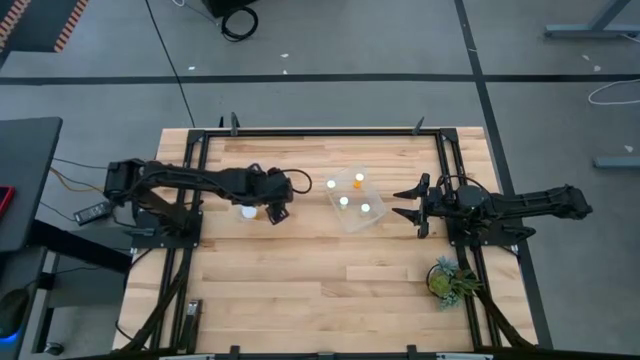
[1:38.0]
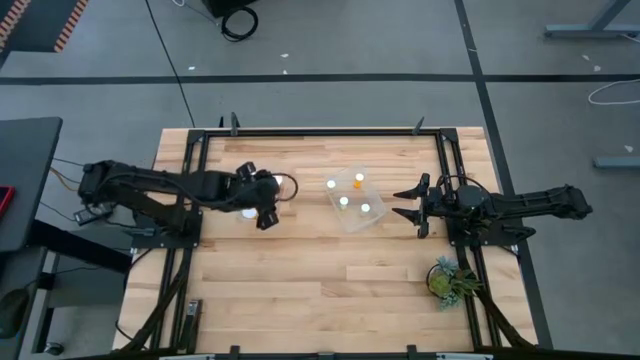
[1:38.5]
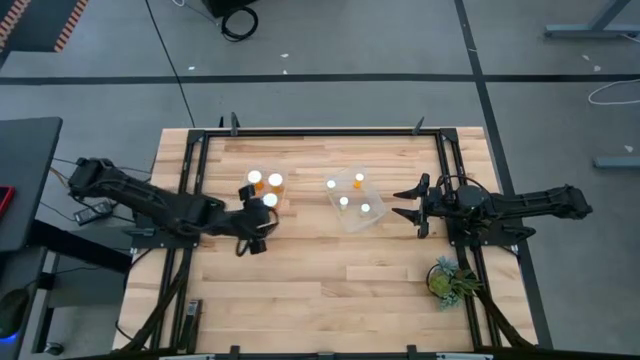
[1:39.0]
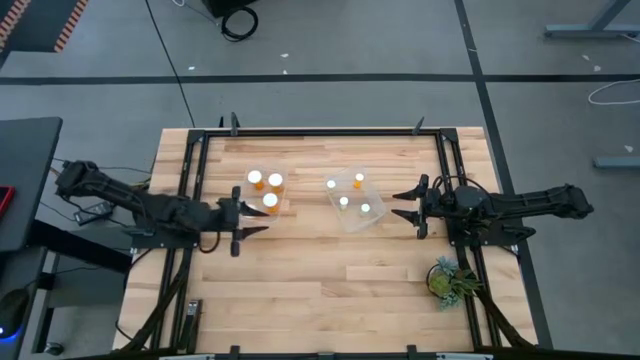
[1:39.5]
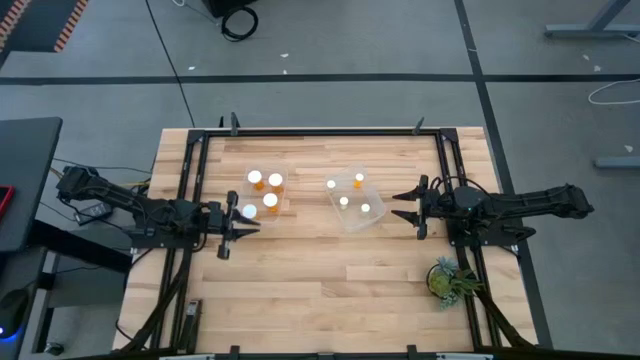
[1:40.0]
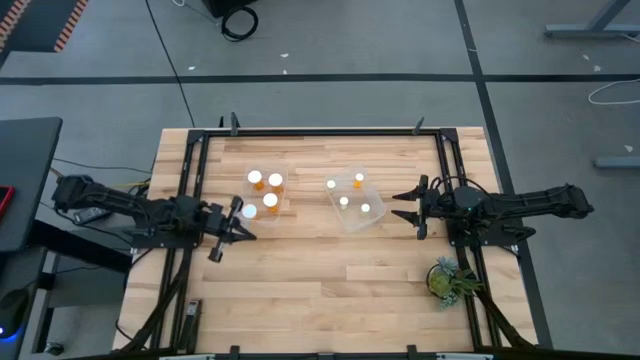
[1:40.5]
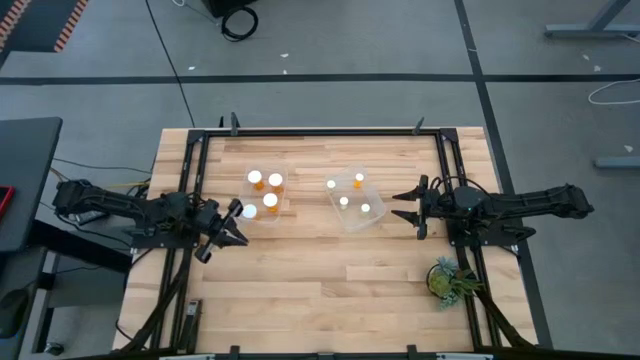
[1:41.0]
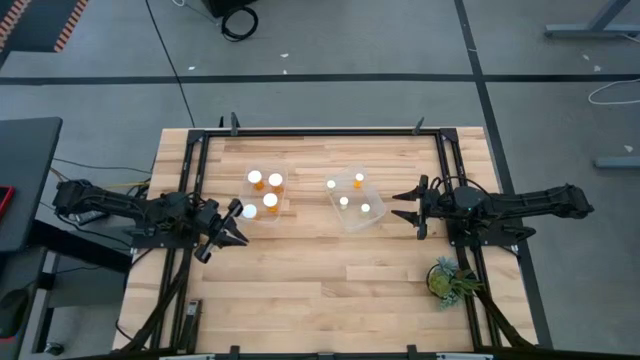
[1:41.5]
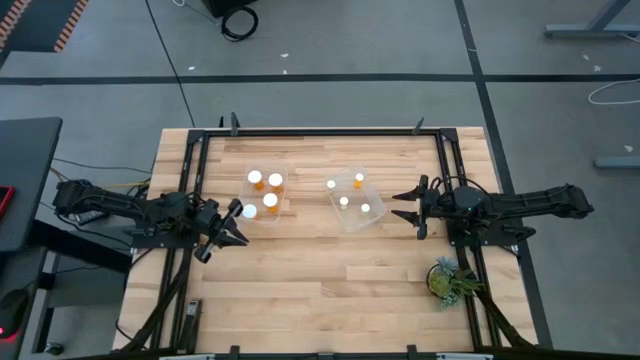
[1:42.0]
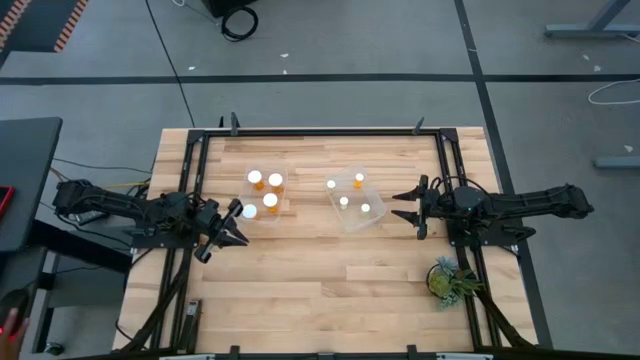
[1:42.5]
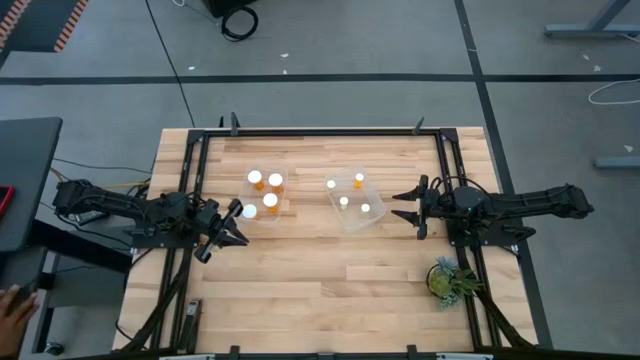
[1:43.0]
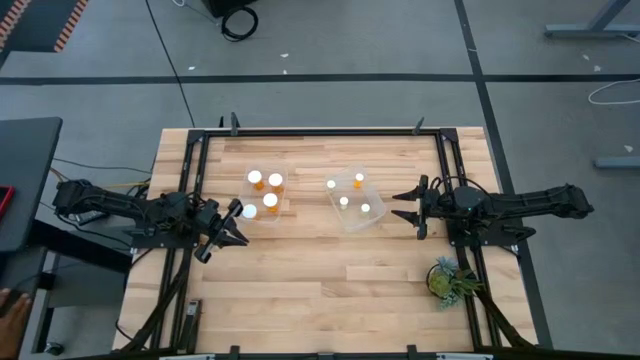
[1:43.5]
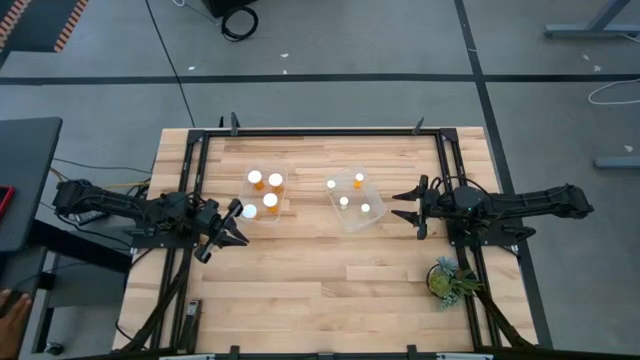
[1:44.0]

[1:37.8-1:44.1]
Task: Pick and place medicine bottles into bin by pill shape (circle, oval)
Return to Home Position

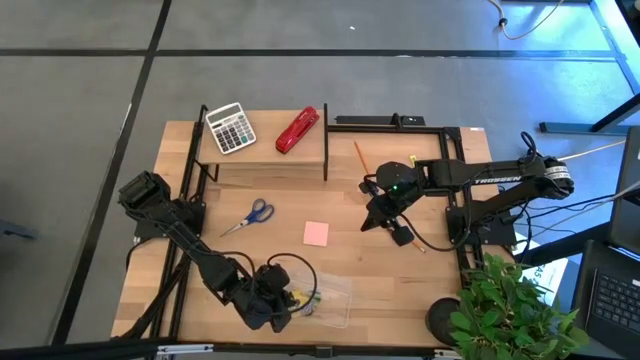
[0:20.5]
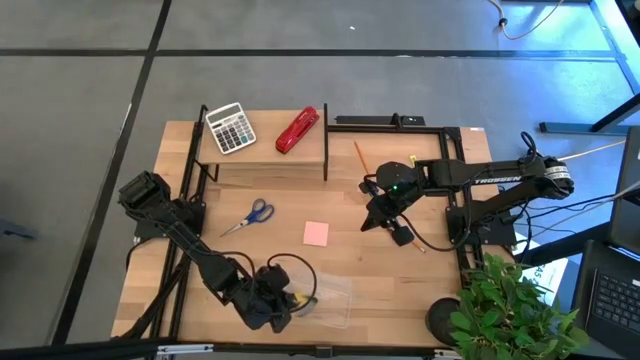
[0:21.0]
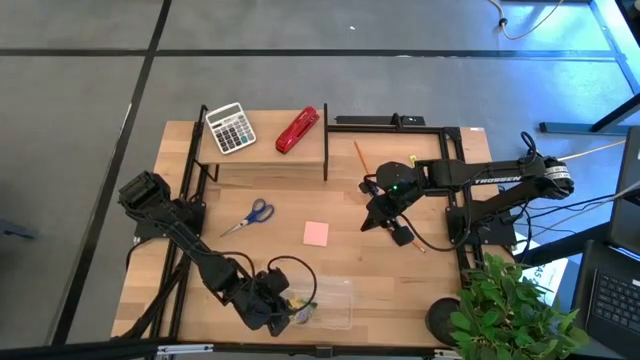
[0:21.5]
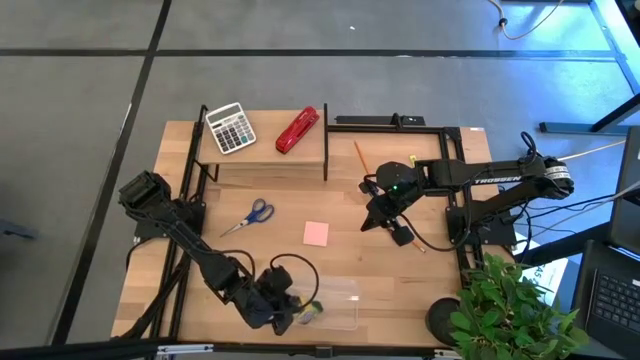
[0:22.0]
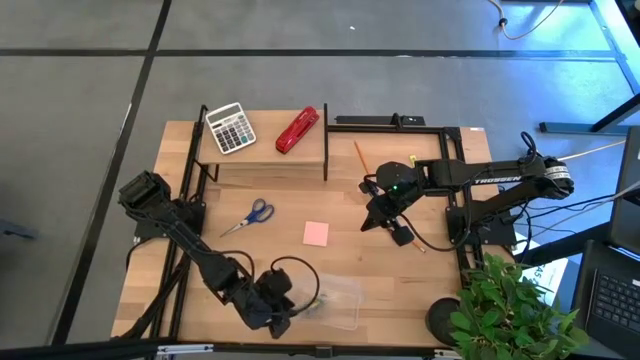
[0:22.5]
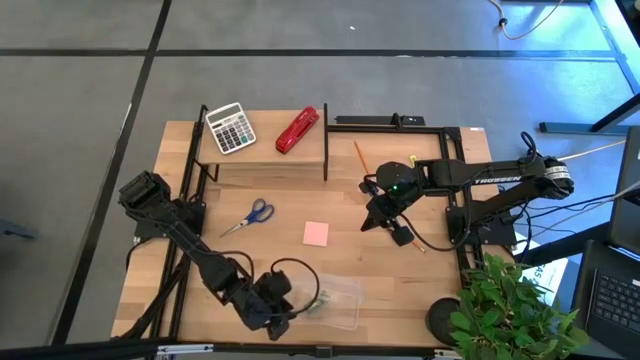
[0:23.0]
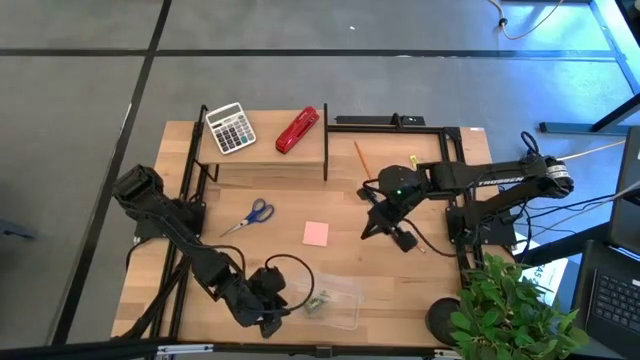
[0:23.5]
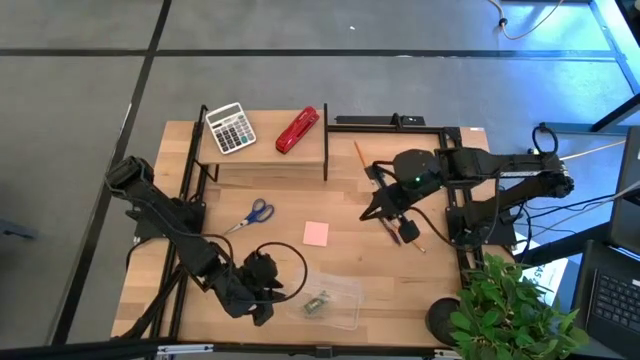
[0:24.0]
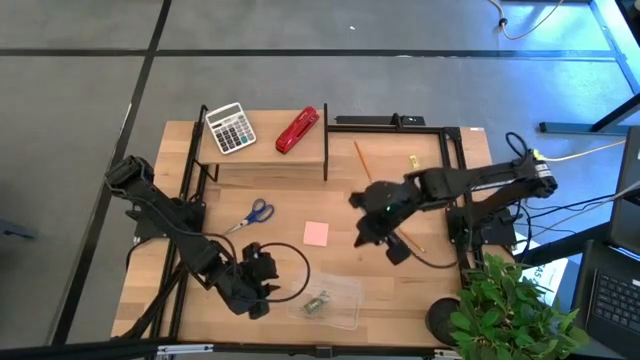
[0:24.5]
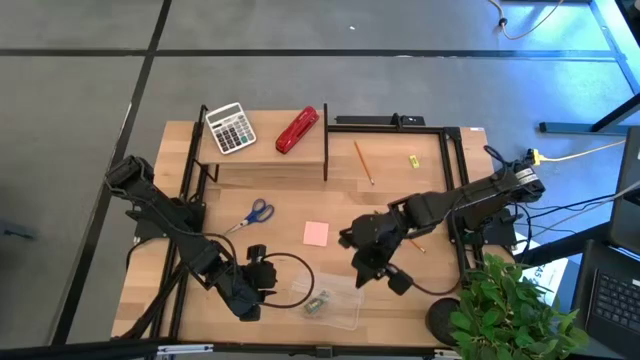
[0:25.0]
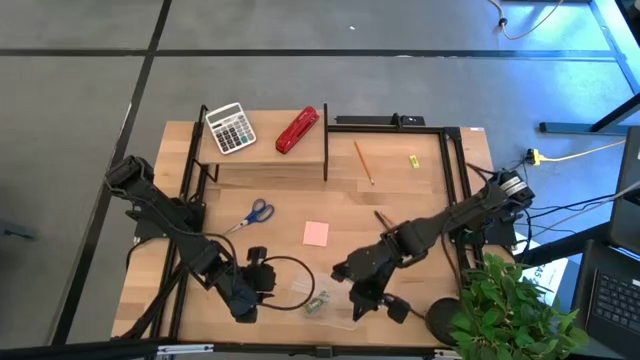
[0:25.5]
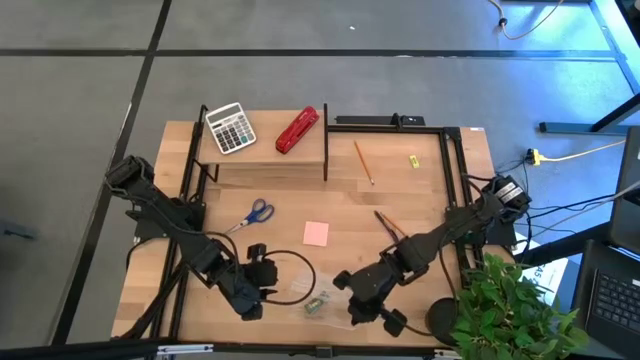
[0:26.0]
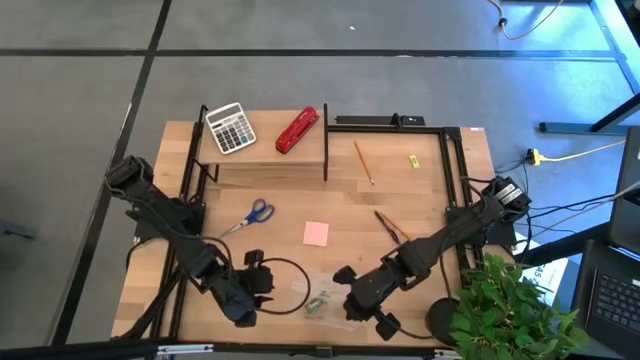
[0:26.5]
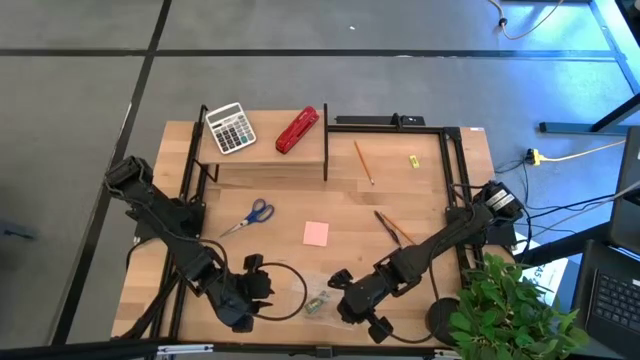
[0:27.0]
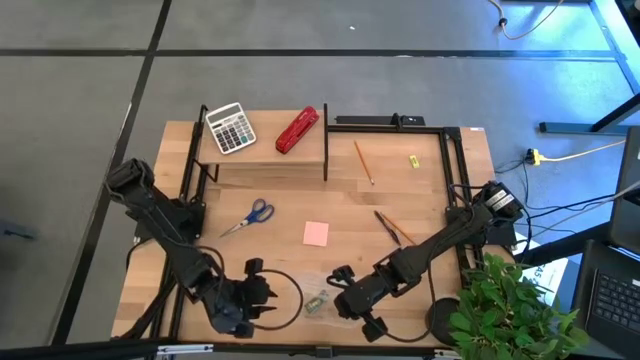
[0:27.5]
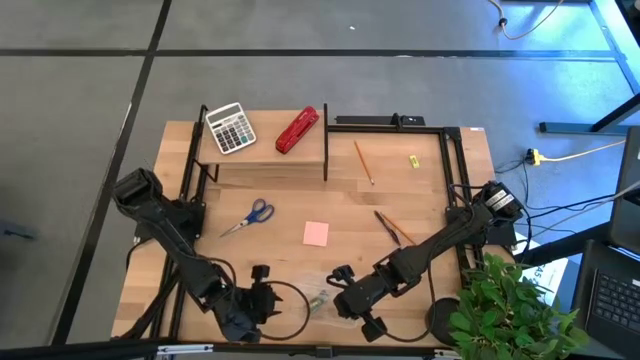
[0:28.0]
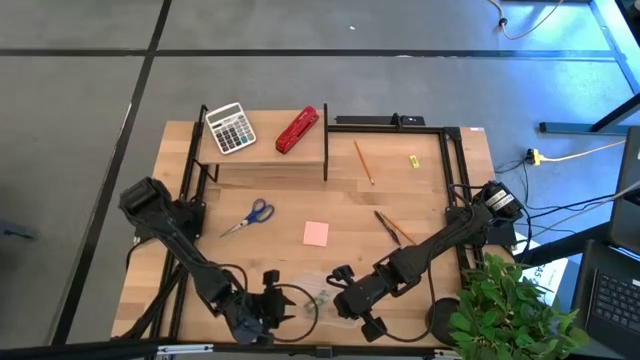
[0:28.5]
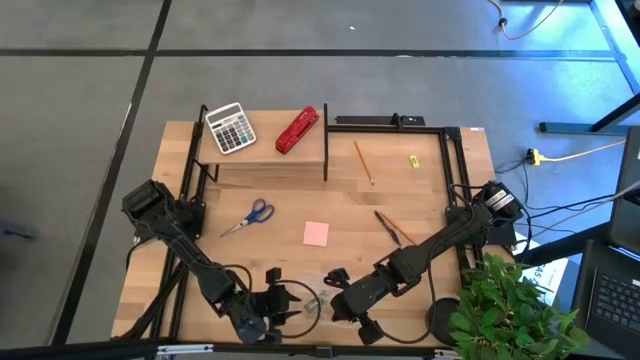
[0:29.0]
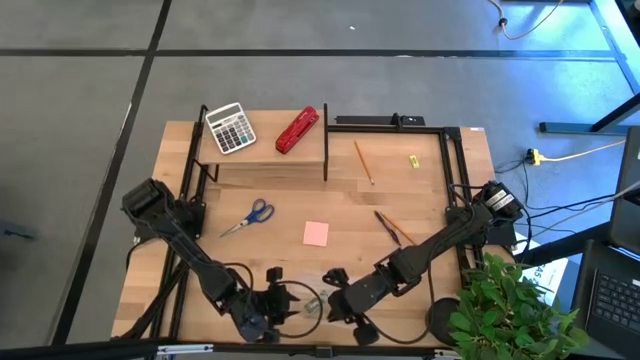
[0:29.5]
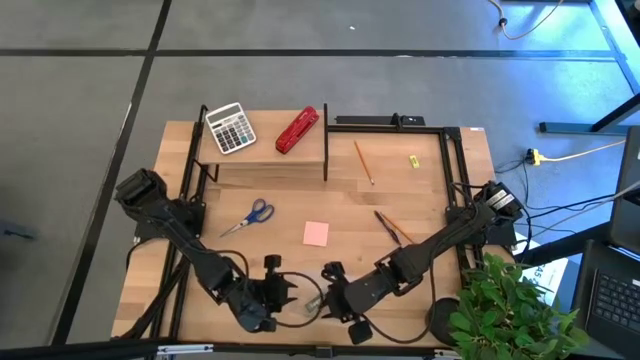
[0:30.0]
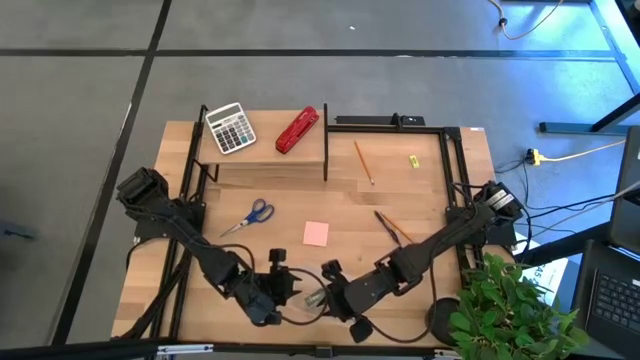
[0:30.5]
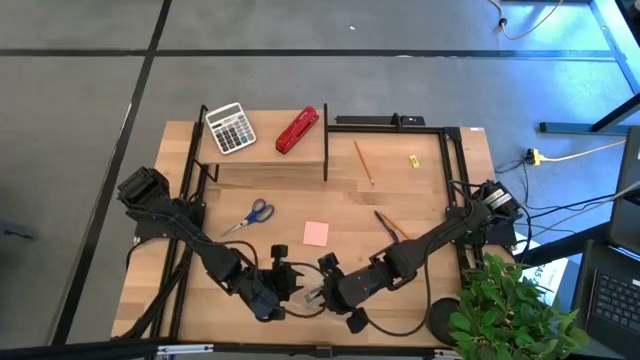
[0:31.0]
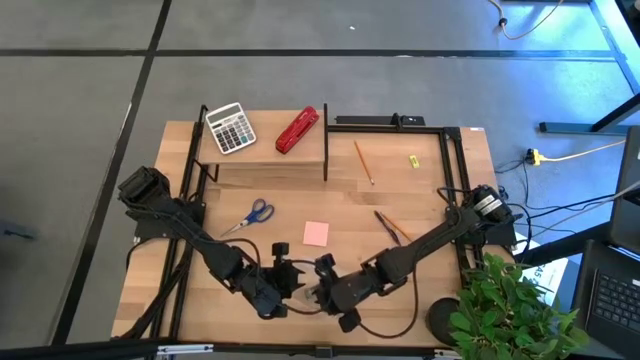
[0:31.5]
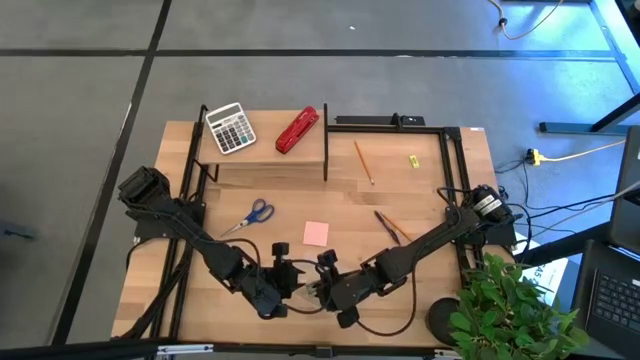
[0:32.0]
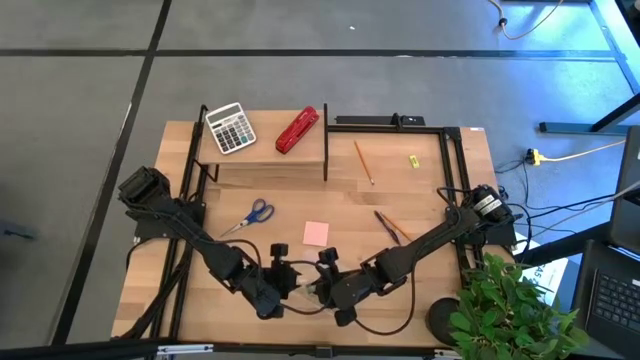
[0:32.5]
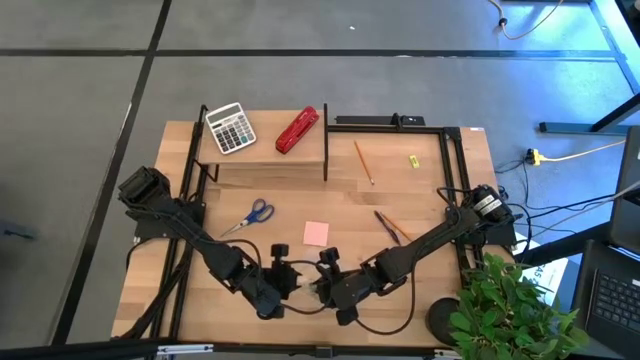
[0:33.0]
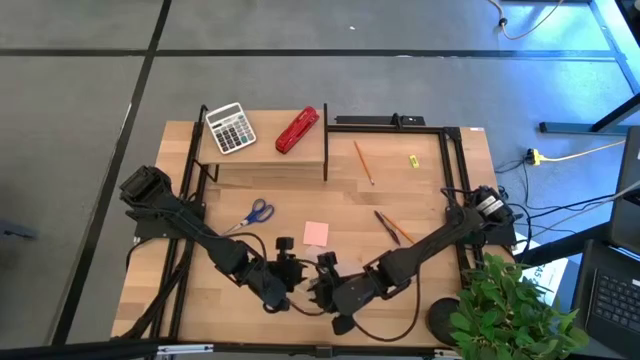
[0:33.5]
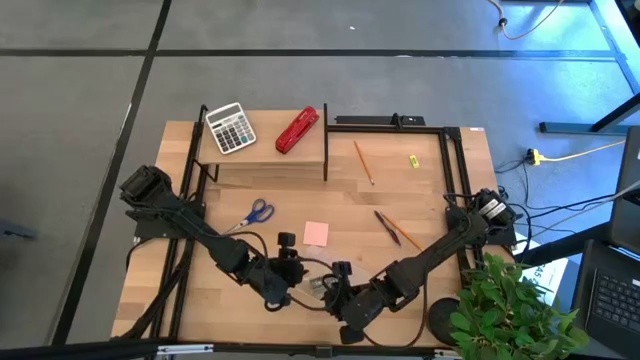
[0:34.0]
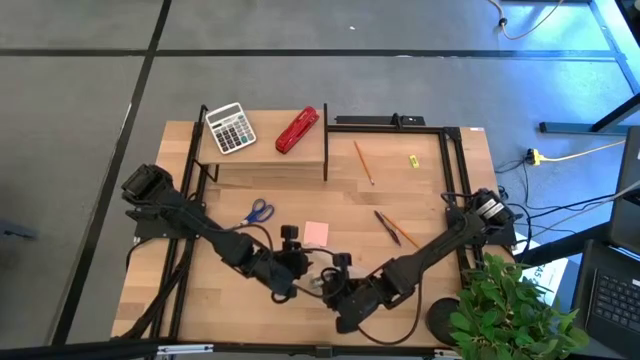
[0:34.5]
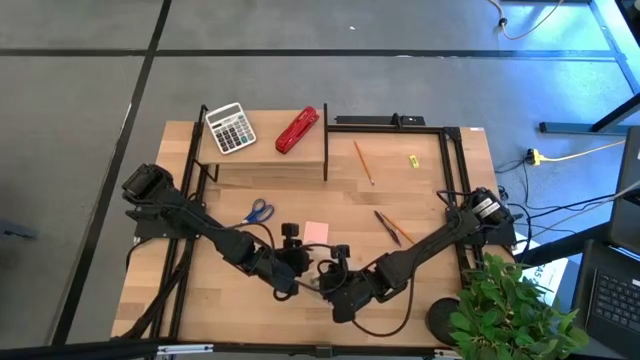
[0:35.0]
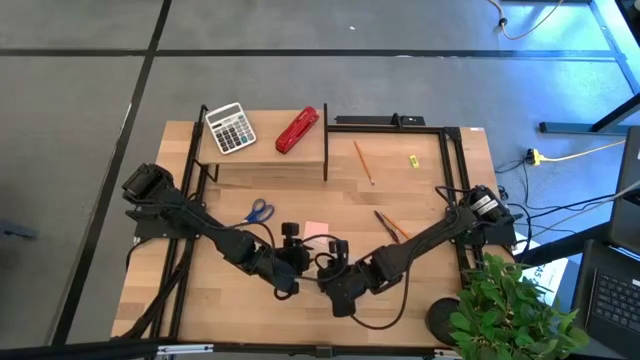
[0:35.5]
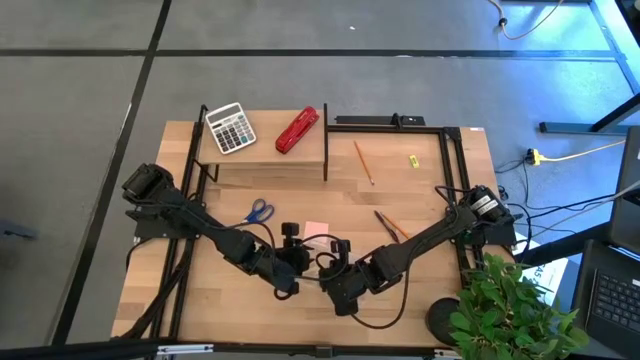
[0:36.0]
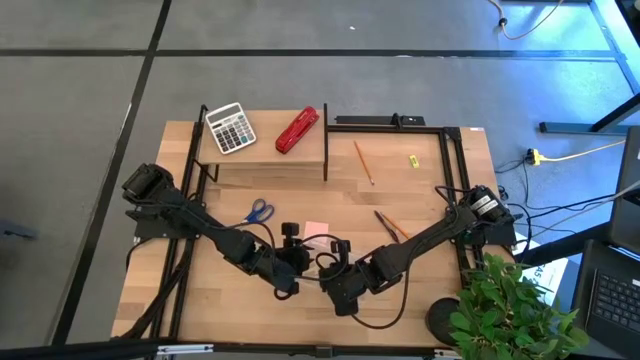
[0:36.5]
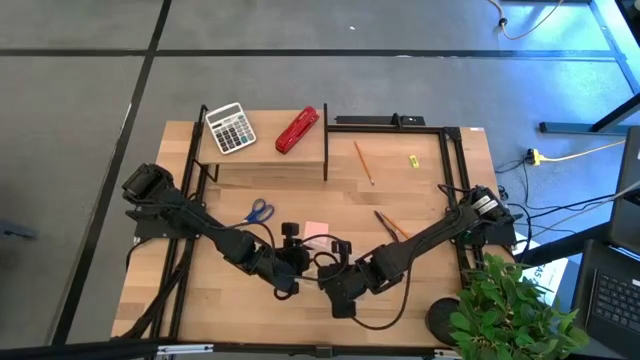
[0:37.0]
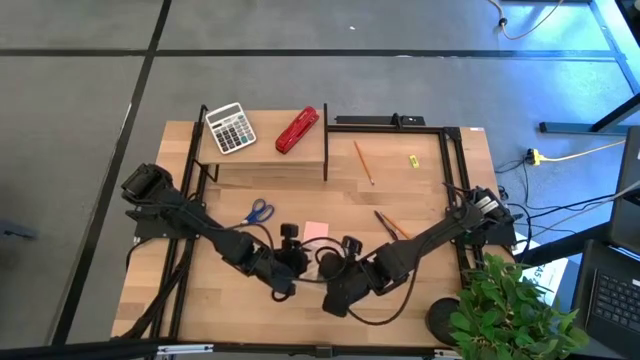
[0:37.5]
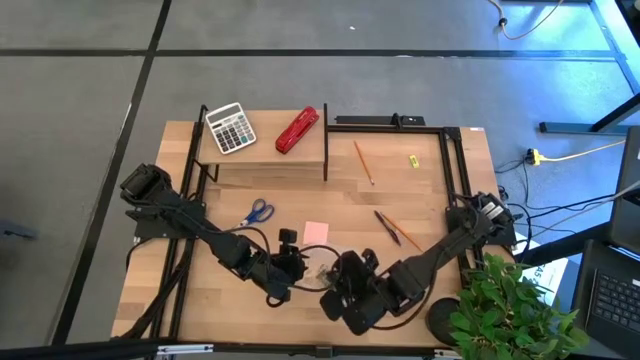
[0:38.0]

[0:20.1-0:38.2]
Task: Pack school essentials
Put the crayon box into the transparent supply box
